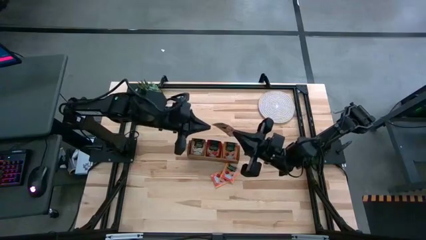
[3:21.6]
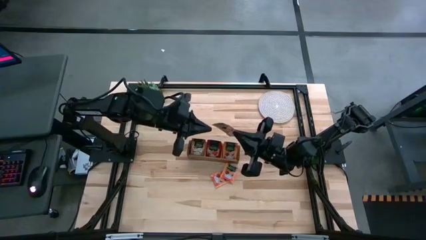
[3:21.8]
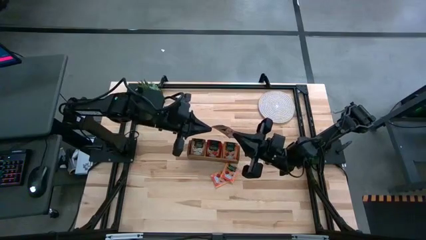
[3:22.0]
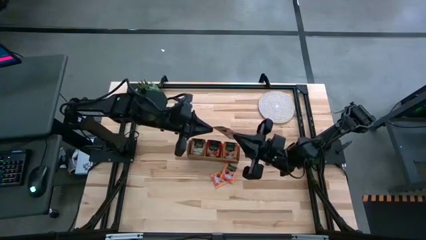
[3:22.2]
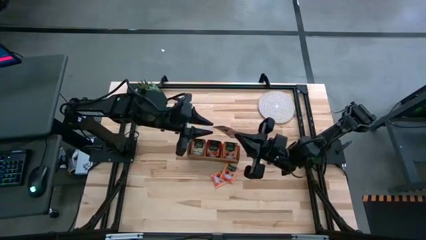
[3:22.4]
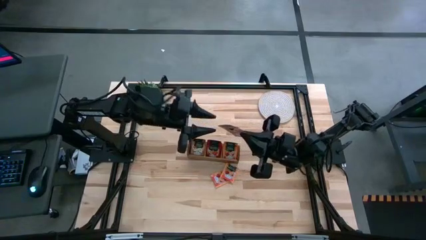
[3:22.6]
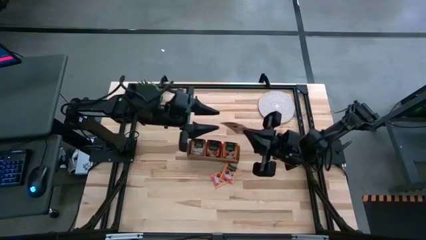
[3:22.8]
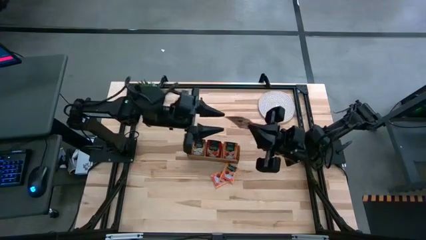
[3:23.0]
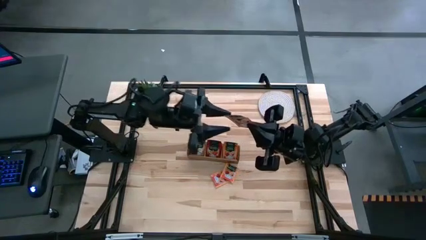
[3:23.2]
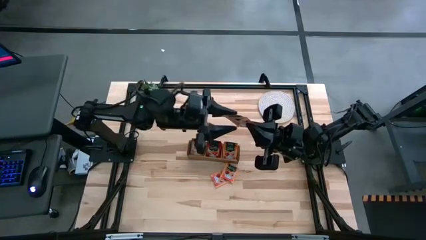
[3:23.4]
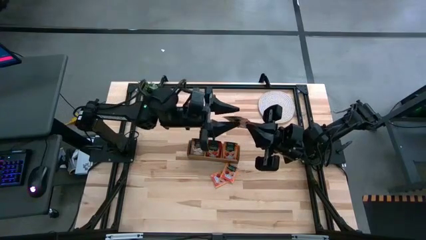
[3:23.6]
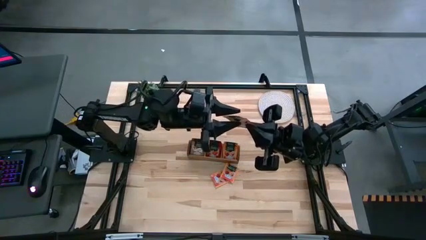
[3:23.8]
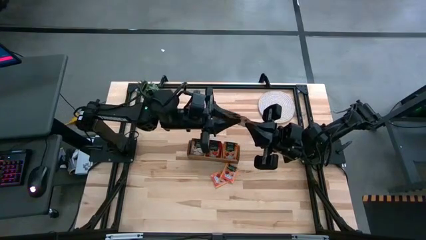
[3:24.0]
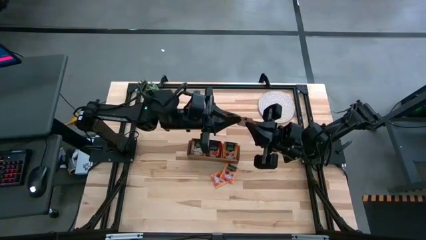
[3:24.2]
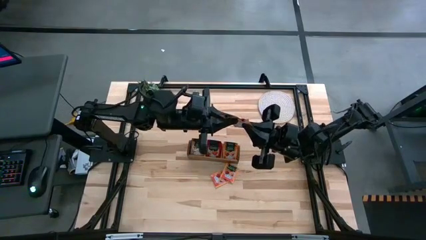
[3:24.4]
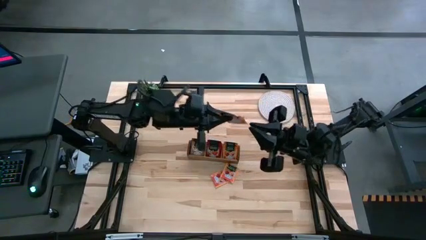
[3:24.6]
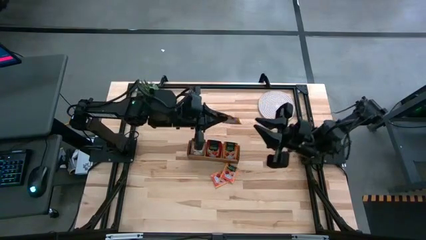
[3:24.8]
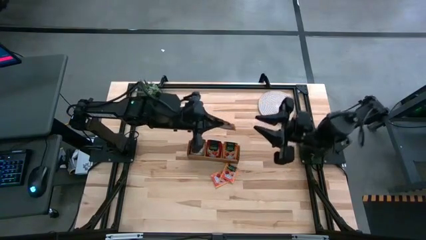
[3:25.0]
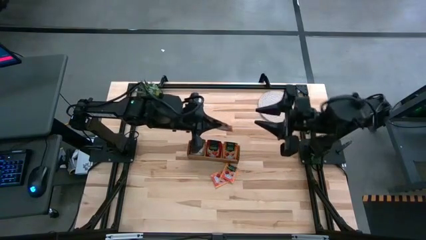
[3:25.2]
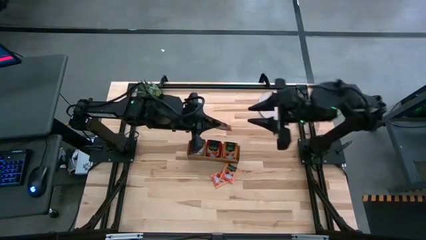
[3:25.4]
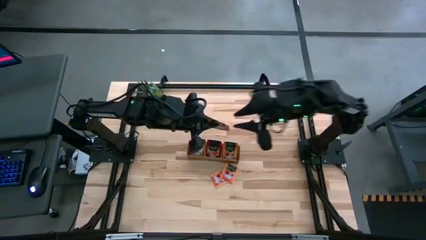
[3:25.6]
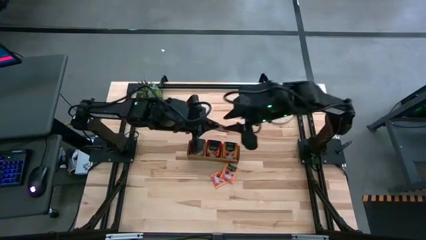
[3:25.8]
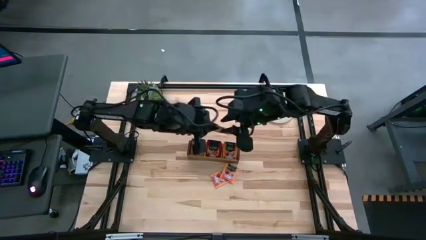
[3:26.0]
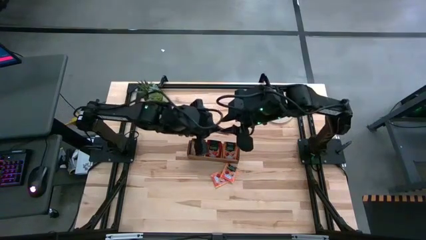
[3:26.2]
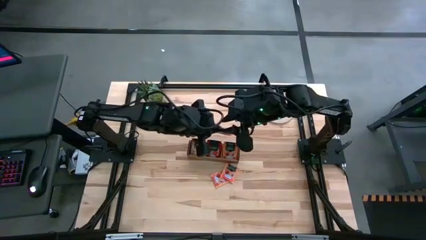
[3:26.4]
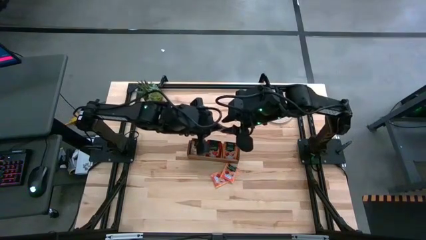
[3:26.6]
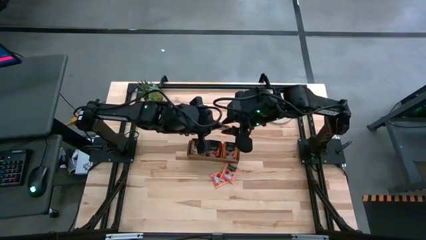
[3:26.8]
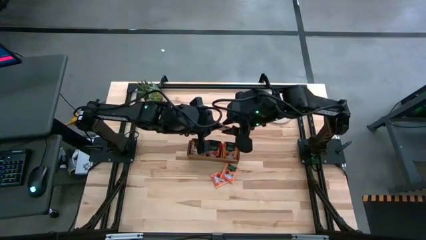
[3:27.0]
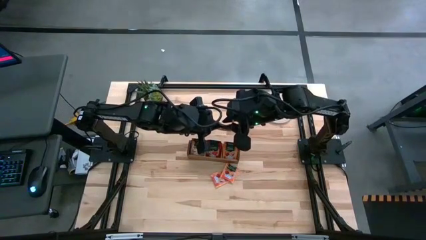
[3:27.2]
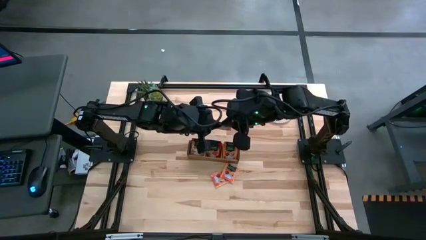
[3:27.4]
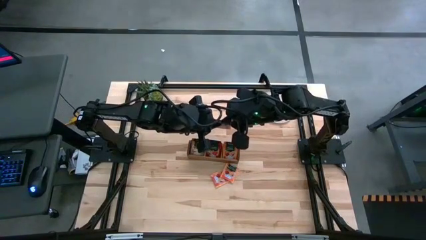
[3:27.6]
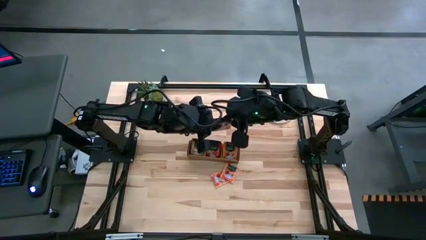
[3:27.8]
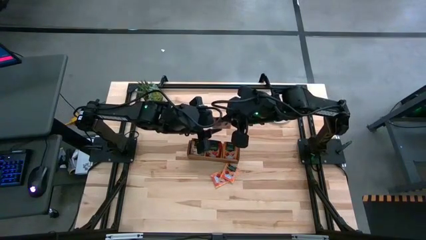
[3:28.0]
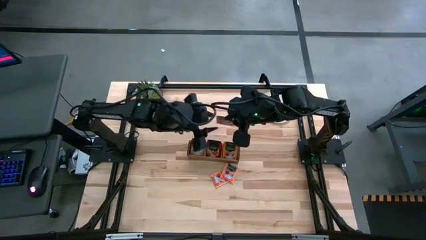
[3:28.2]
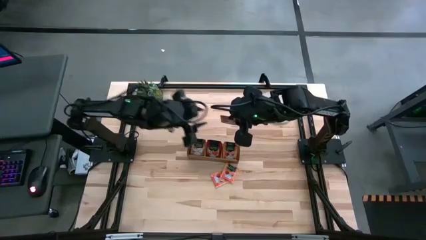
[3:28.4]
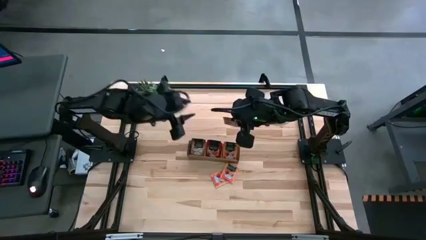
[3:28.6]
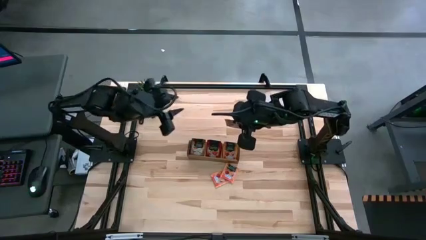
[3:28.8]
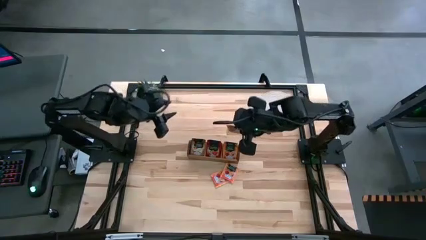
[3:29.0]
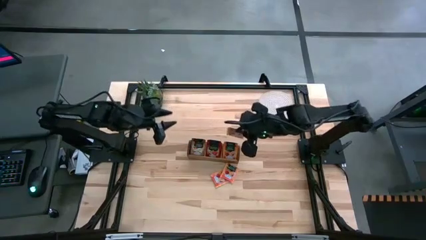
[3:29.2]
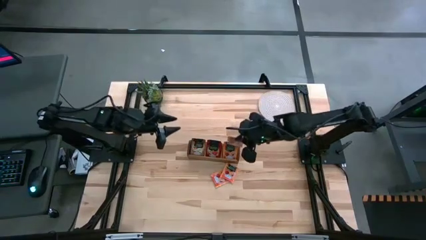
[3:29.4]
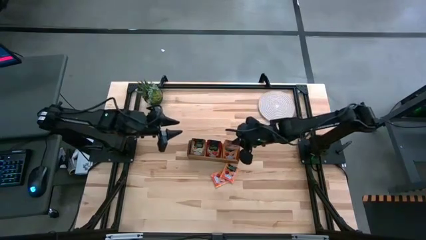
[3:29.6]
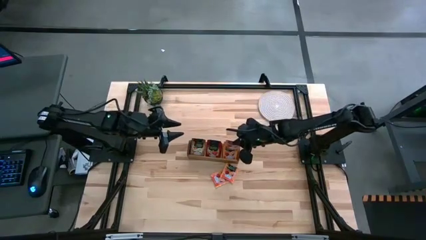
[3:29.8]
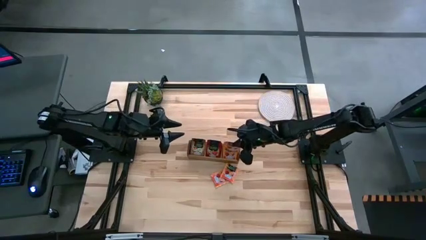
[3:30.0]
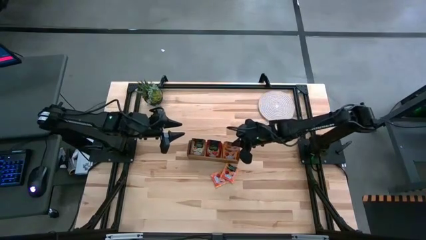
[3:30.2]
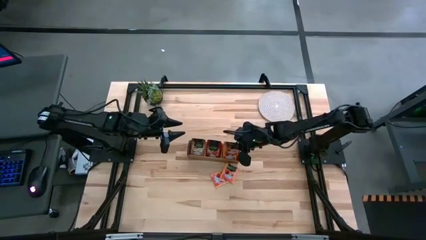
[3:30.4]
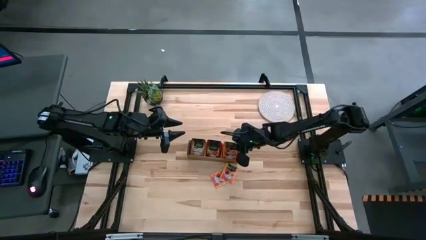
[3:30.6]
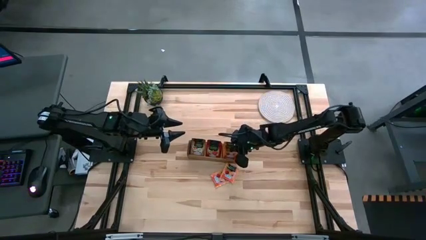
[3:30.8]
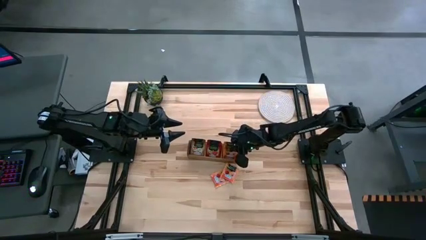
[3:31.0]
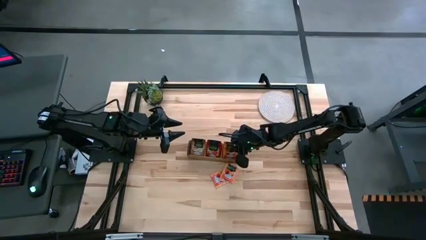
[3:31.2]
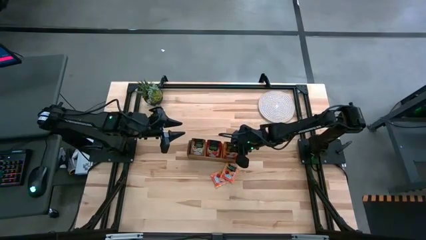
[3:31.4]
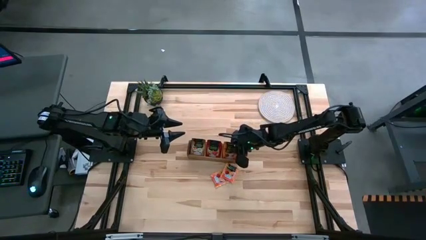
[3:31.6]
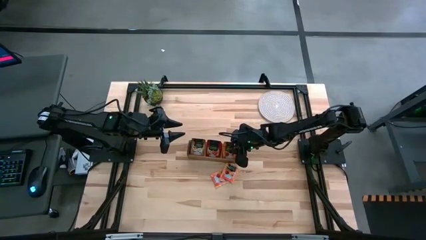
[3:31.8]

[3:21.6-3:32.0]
Task: Pick & Place Tea
Put the orange tea bag into the right section of the brown wooden organizer
